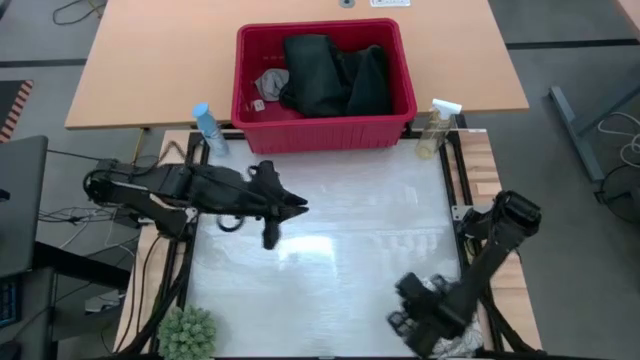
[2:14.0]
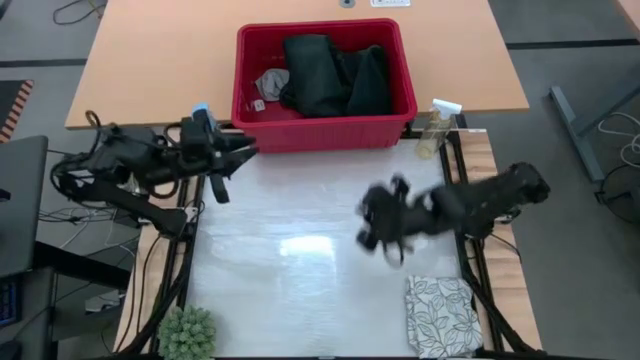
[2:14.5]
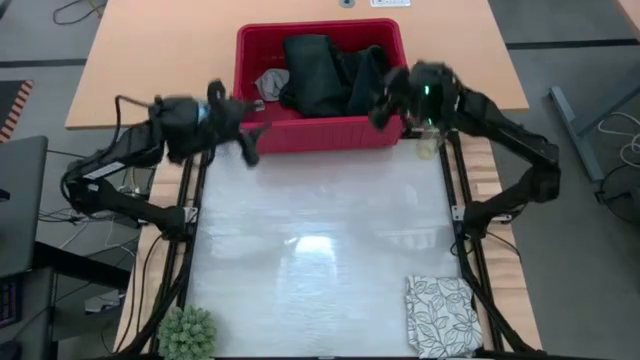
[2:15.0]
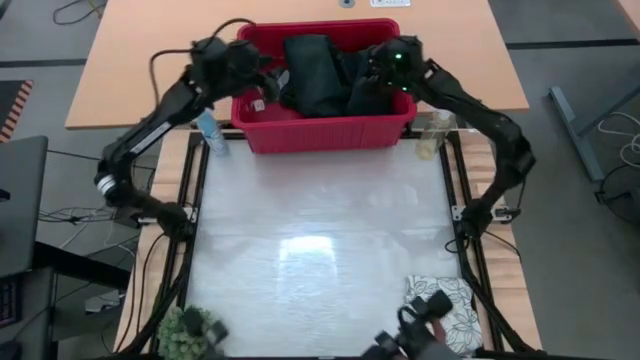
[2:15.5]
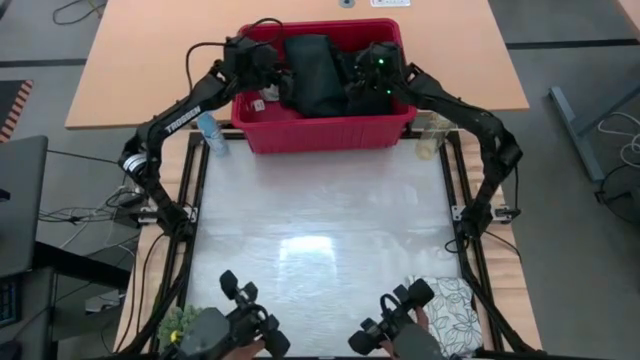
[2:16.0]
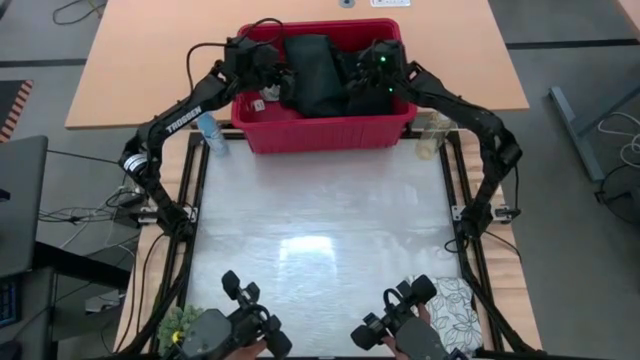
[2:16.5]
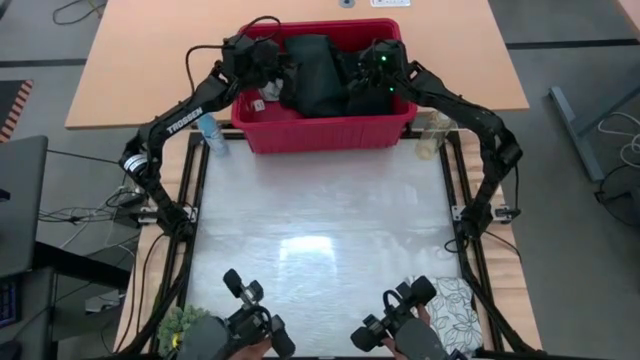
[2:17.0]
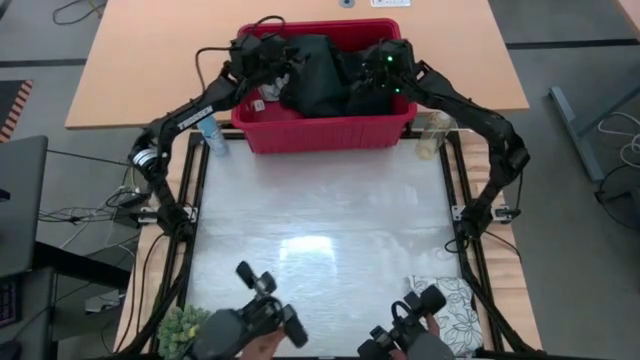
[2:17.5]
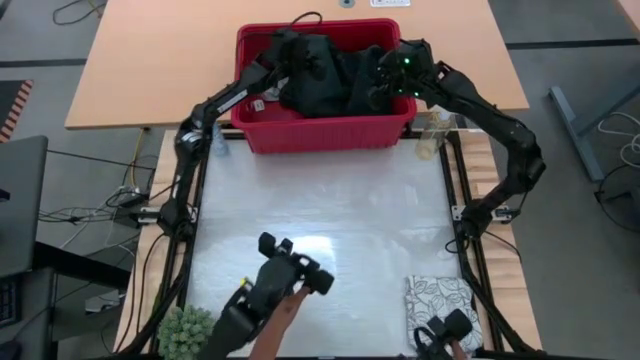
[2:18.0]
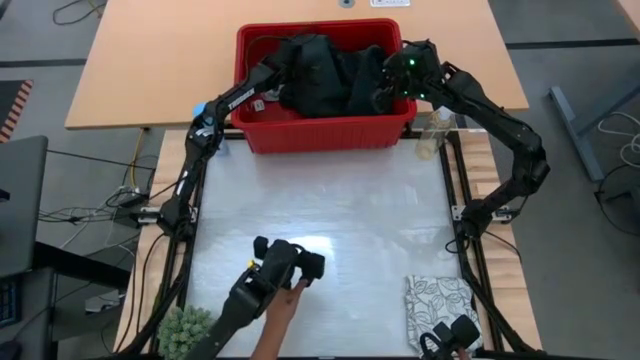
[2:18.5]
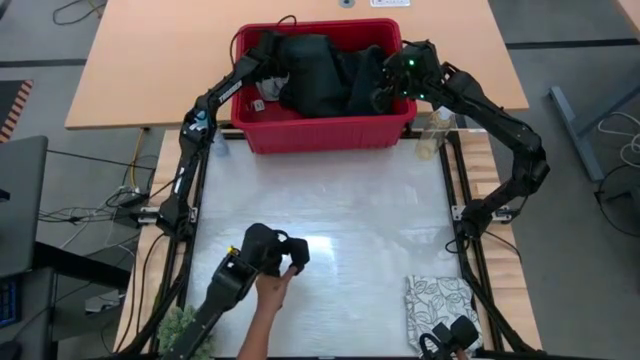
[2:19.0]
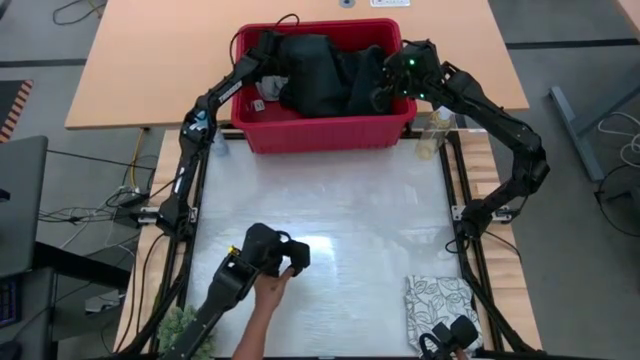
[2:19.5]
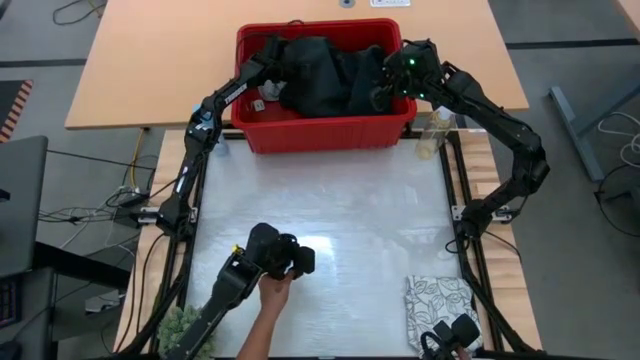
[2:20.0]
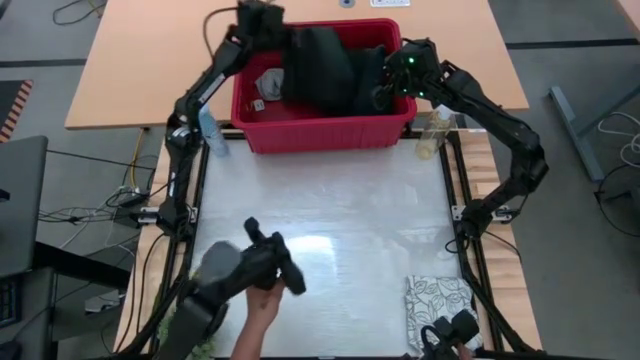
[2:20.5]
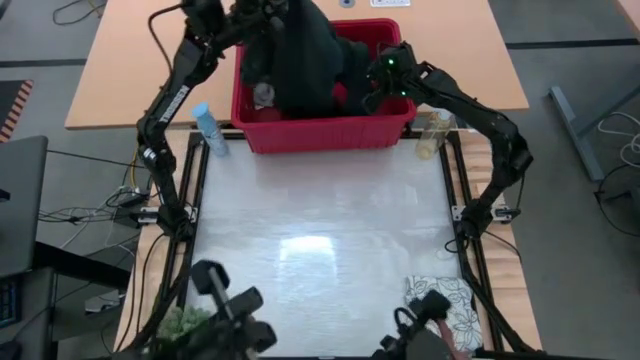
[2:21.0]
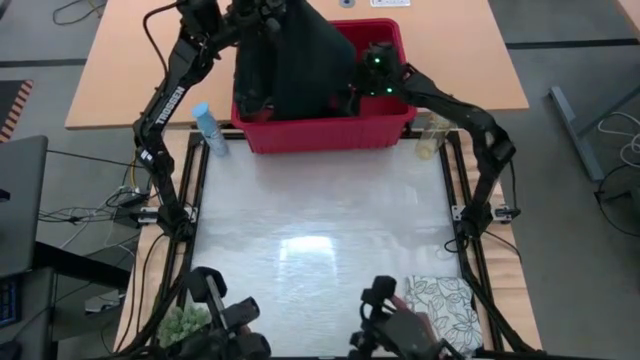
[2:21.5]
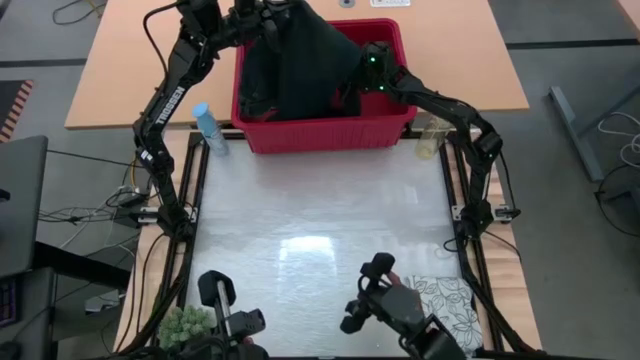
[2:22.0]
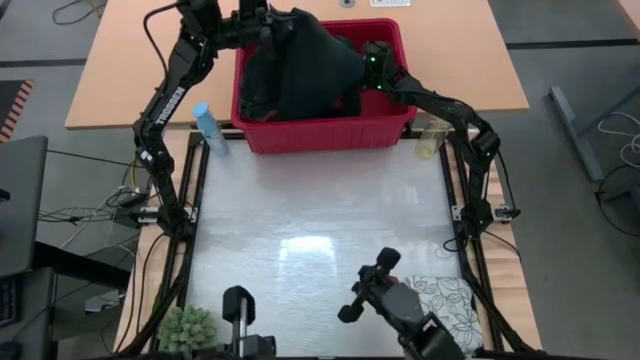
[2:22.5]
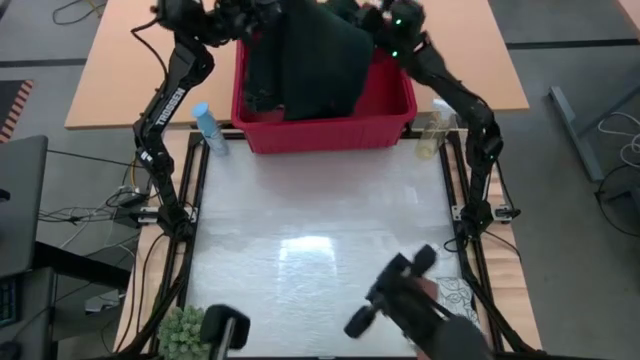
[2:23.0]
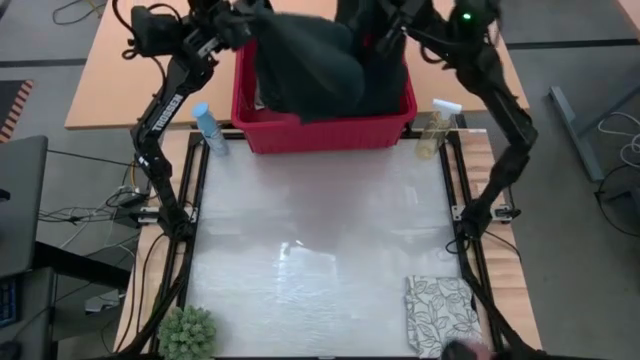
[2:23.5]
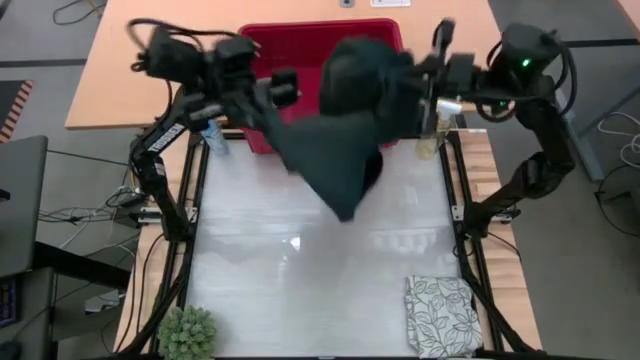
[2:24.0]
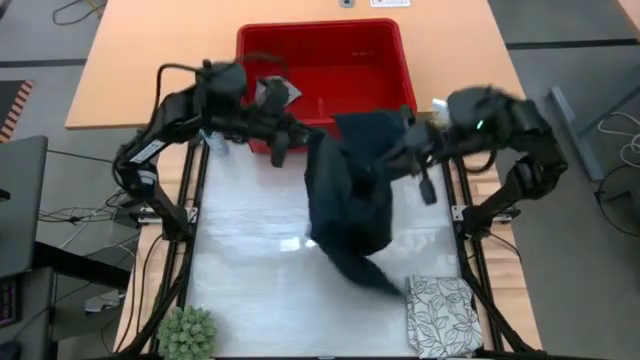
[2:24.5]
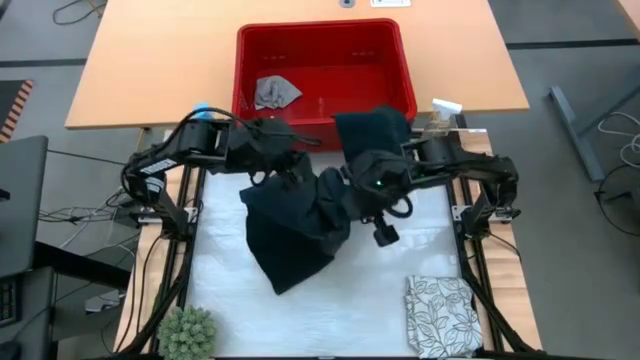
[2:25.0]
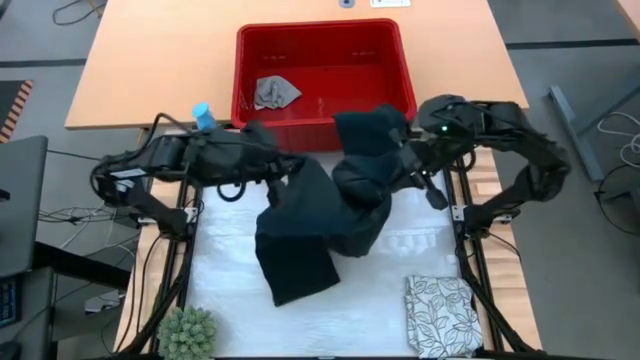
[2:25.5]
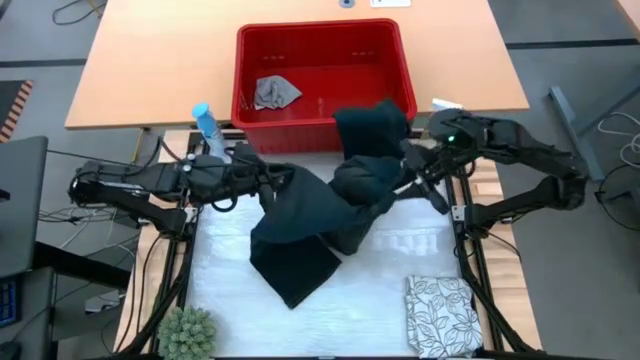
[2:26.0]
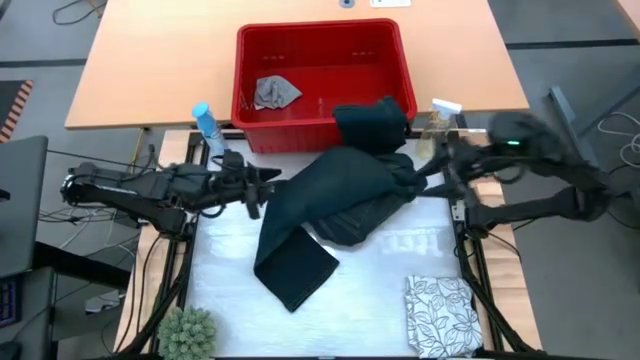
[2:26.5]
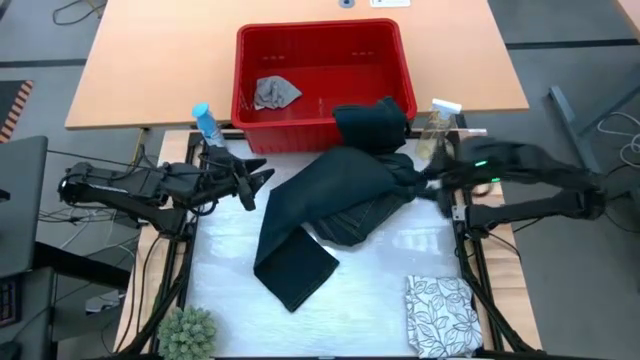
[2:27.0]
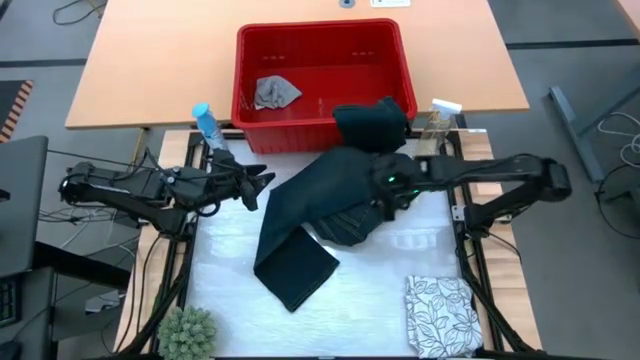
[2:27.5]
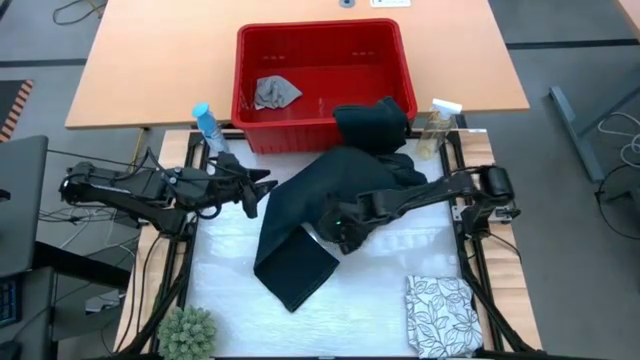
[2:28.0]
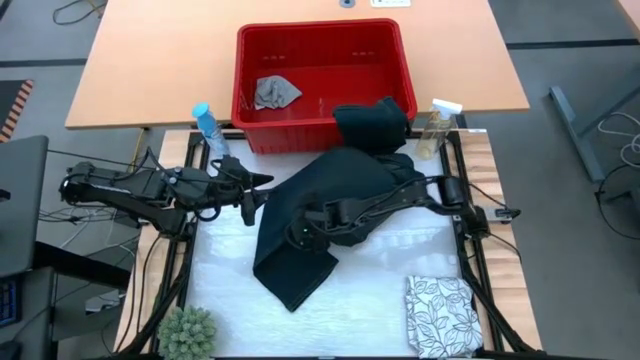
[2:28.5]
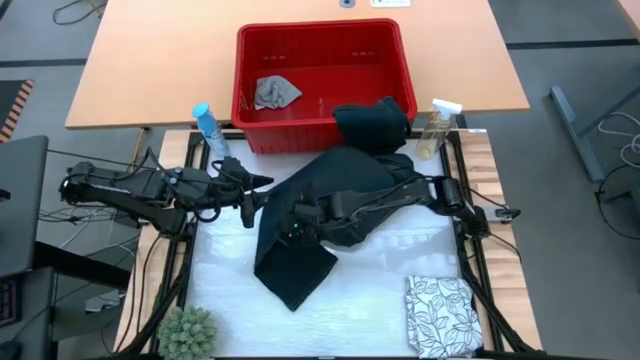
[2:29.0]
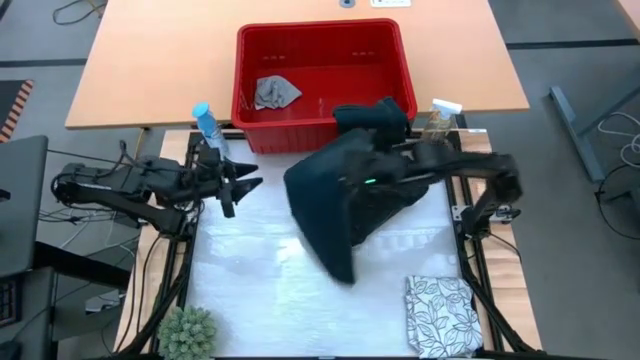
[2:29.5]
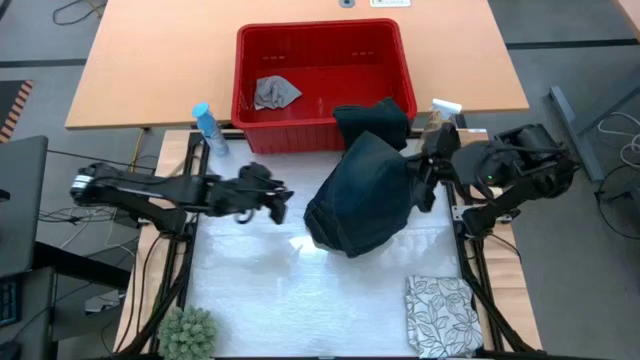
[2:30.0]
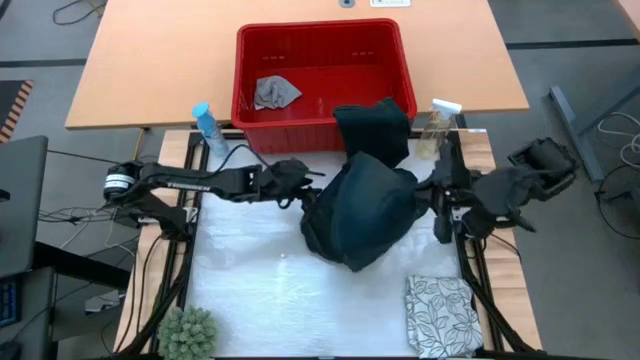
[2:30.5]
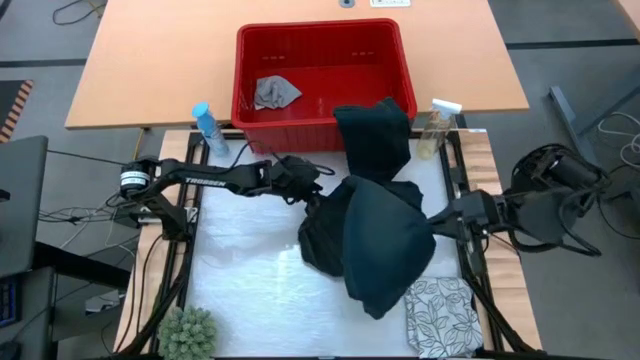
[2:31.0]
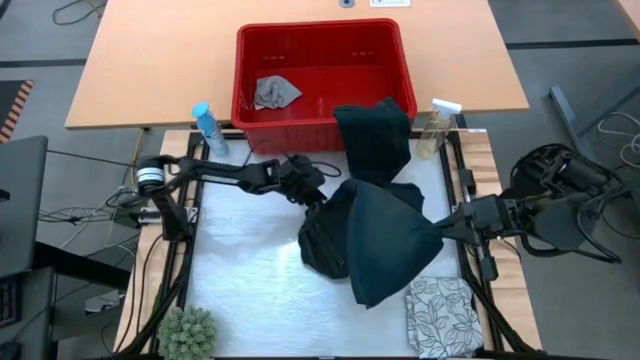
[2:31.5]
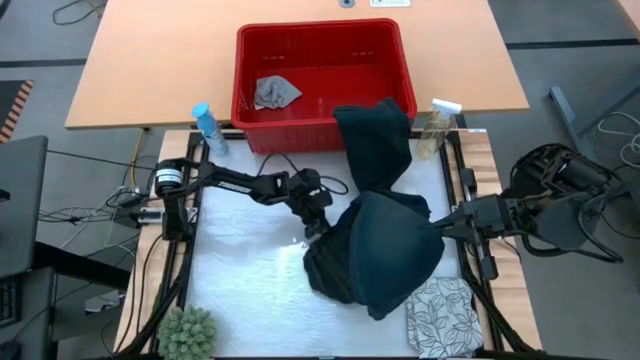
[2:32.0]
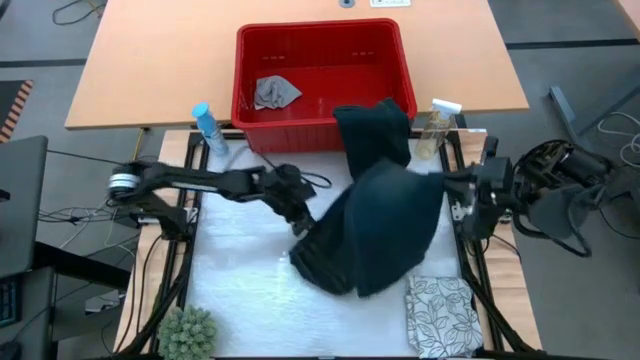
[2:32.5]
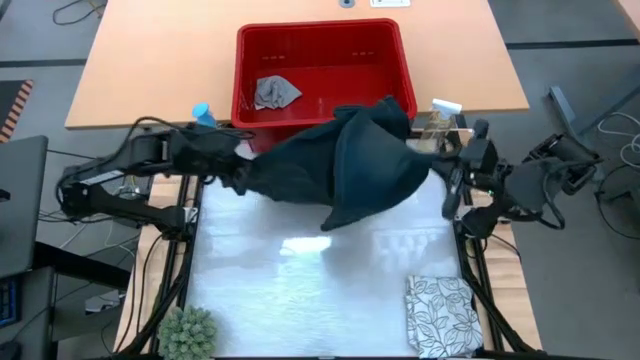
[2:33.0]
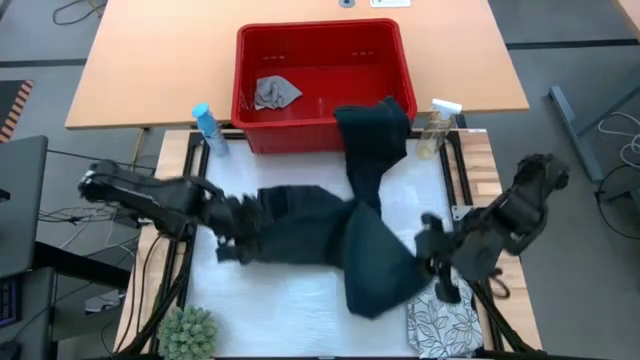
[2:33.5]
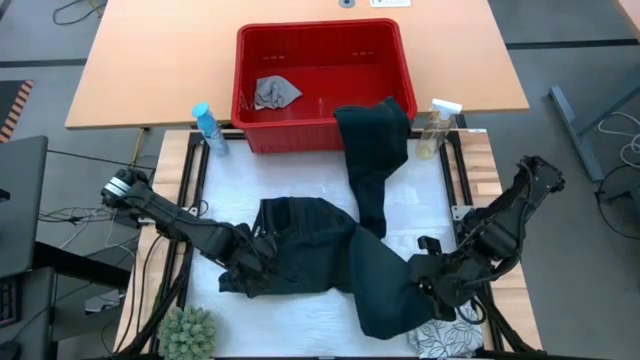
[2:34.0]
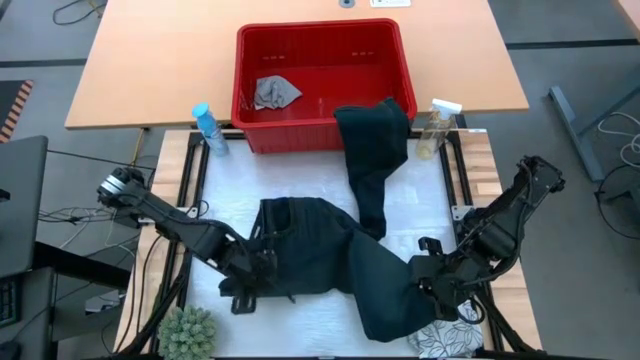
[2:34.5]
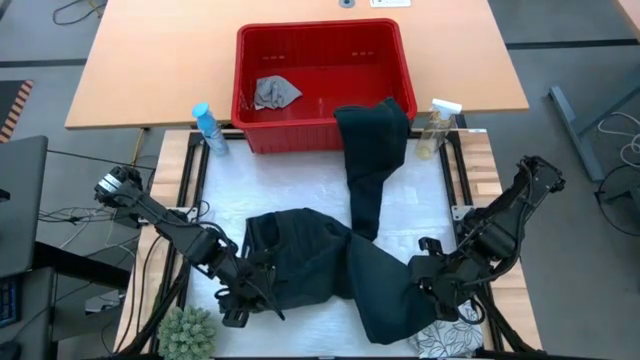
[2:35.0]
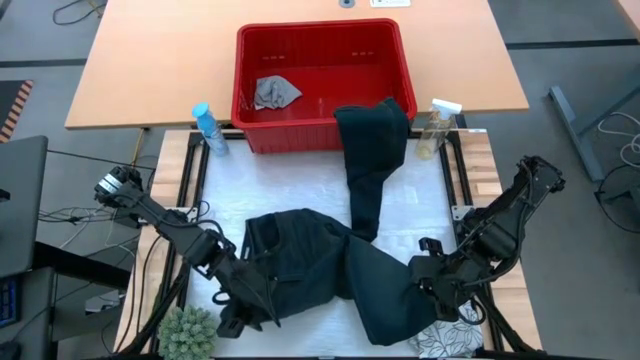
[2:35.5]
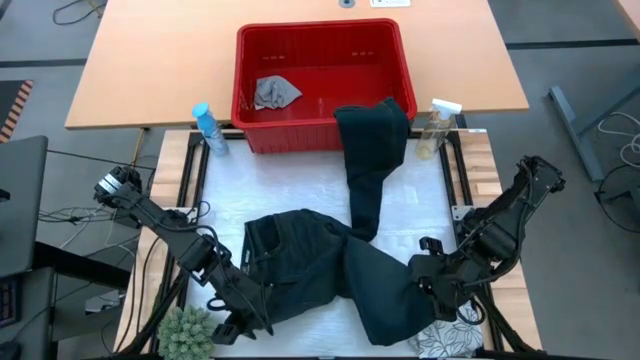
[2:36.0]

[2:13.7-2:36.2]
Task: Fold laundry
Fold the dark blue pants
